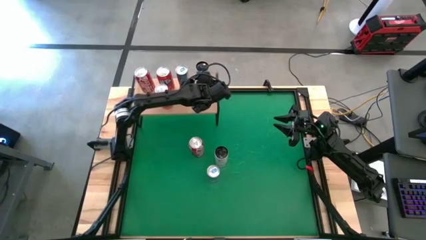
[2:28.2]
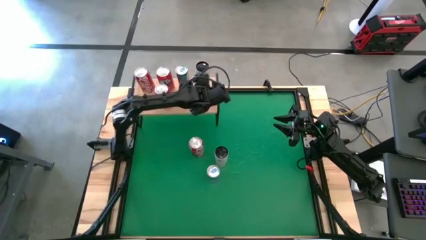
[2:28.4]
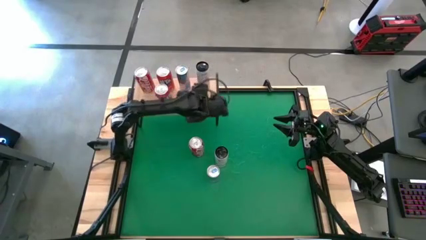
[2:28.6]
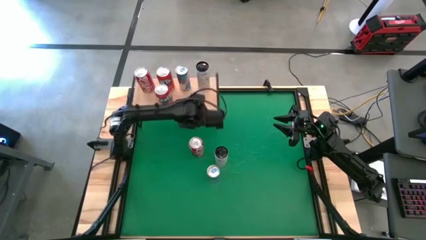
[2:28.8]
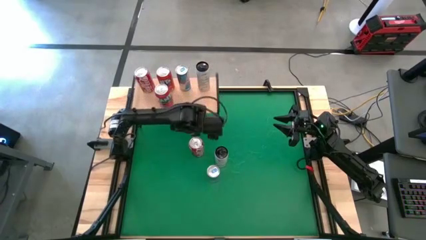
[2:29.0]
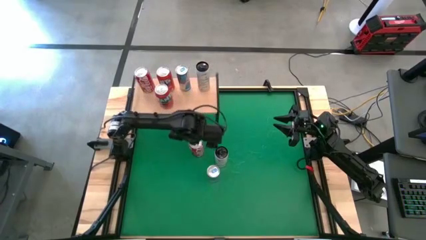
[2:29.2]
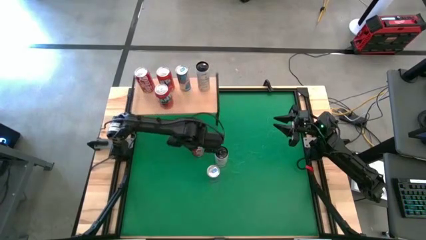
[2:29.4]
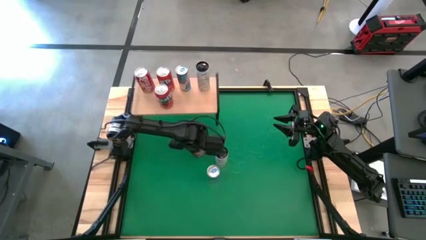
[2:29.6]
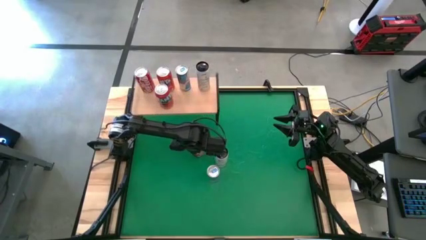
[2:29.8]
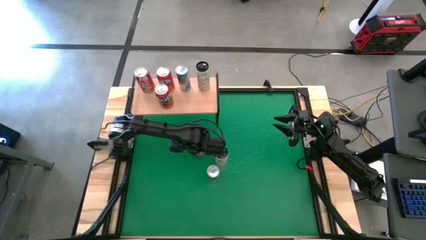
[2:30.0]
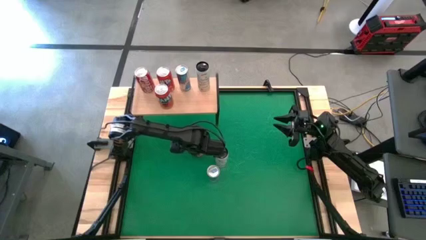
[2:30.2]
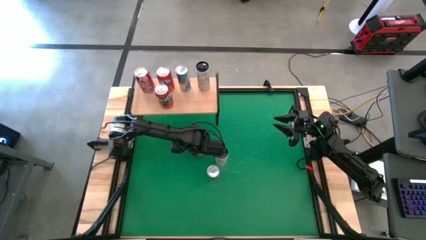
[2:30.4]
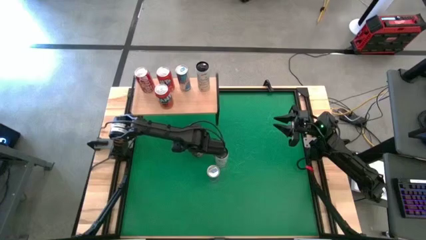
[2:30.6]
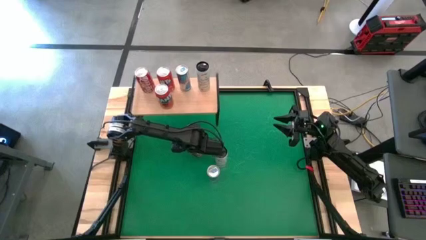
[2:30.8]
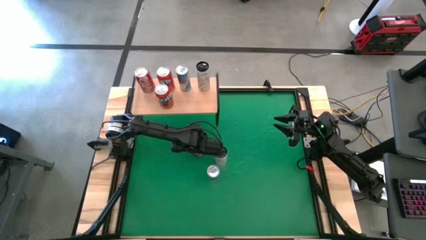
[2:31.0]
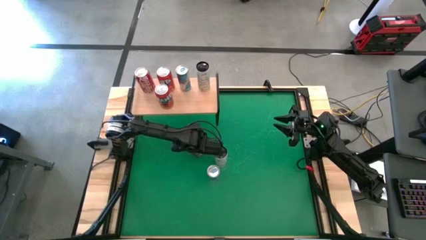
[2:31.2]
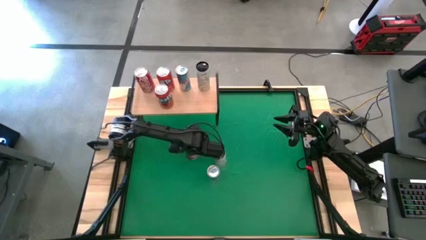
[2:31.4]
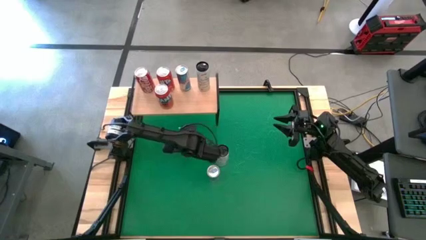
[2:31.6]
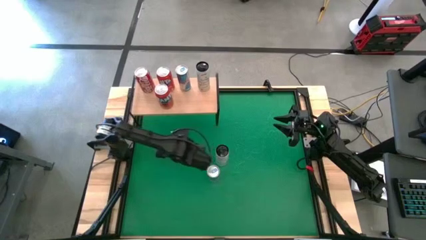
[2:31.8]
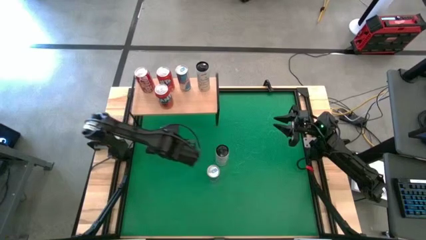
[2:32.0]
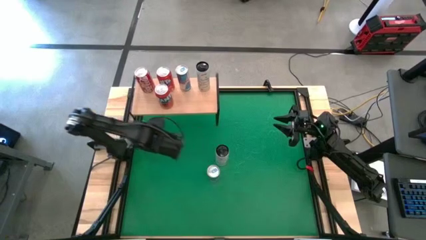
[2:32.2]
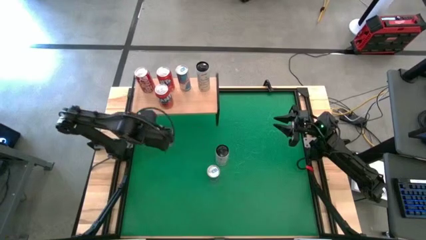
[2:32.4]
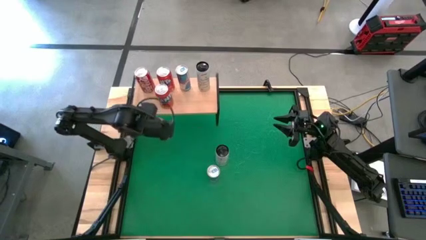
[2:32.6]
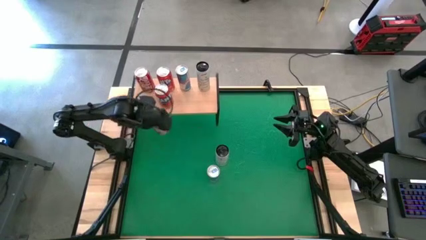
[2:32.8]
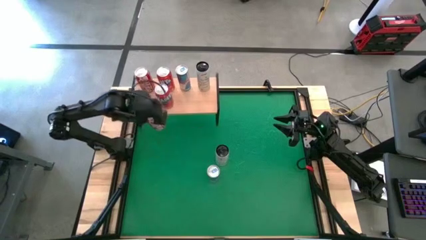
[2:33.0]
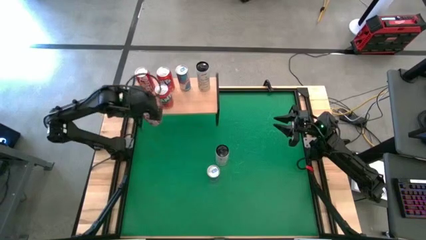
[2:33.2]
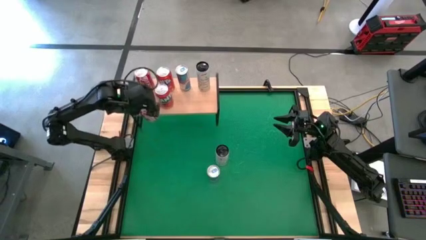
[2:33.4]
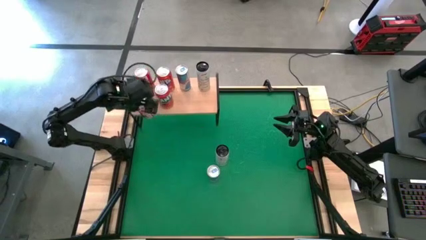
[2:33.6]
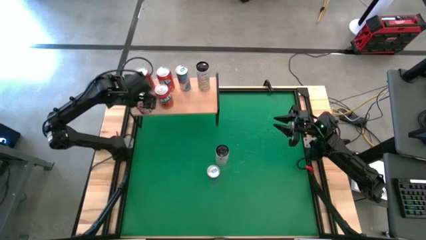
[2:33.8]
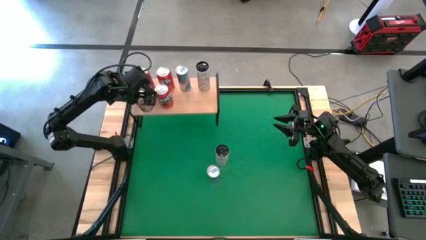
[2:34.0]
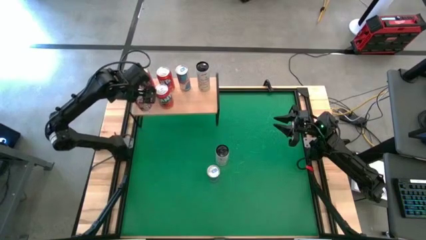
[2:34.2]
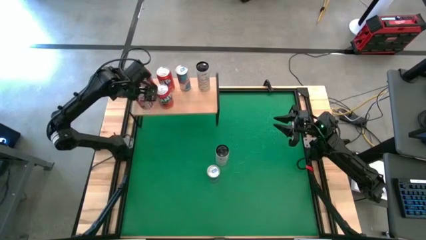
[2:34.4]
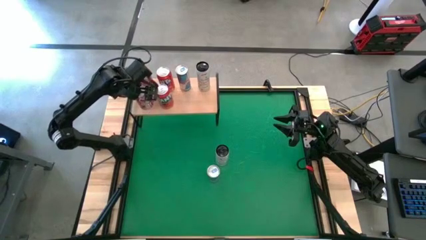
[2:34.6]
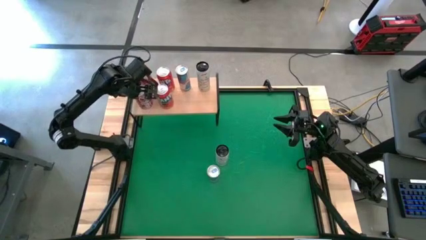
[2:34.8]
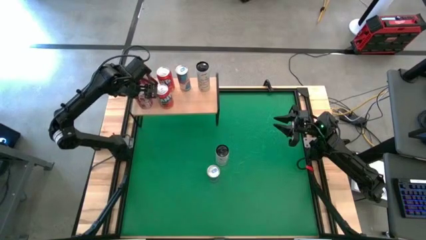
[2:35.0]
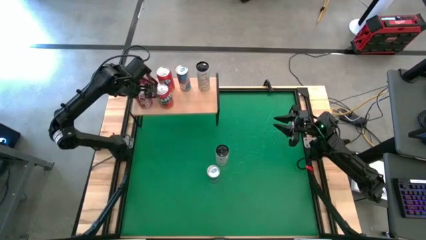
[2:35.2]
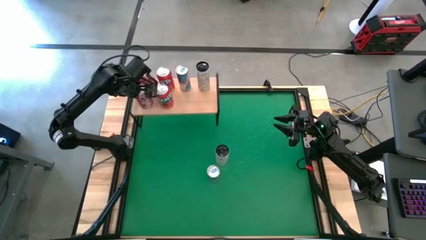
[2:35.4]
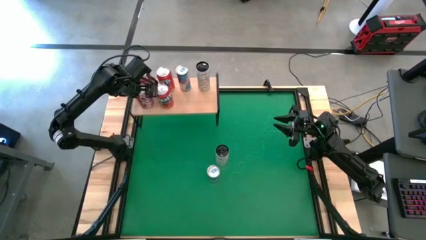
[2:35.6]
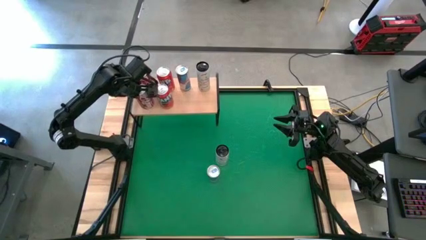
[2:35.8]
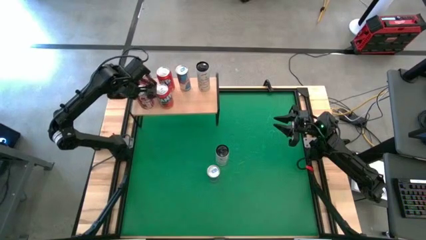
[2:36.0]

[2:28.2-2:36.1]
Task: Place canned beverage on shelf
Put the red white soda can aligned with the other red white soda can on the shelf

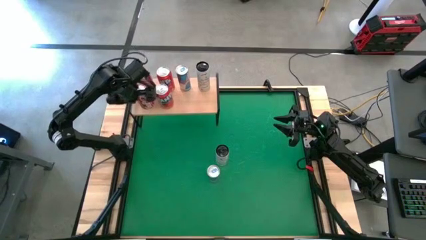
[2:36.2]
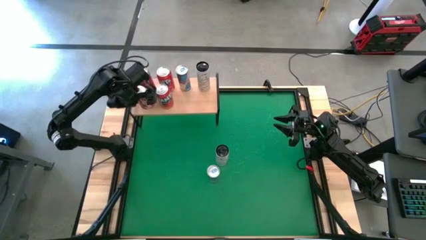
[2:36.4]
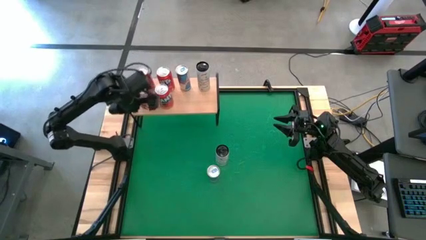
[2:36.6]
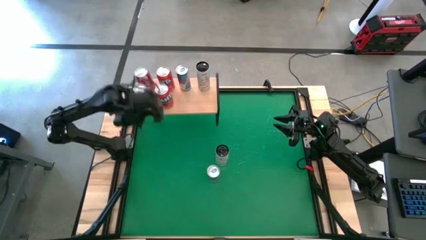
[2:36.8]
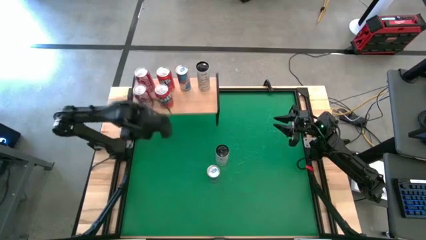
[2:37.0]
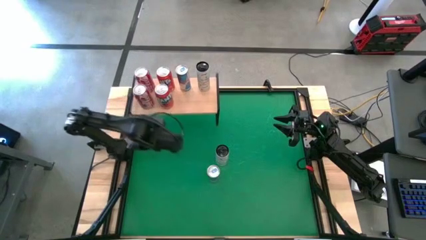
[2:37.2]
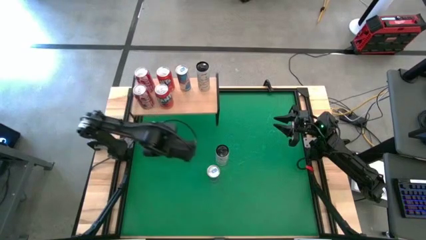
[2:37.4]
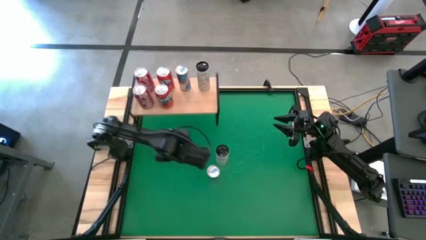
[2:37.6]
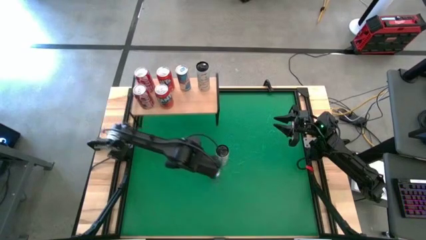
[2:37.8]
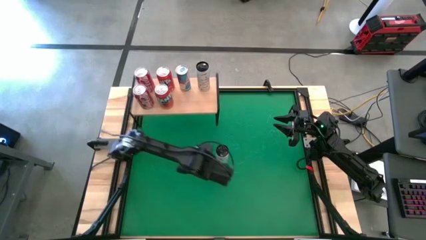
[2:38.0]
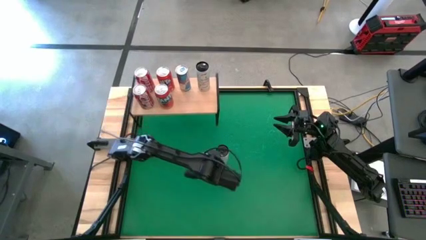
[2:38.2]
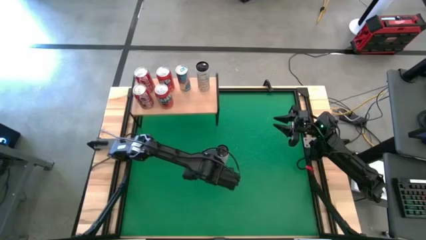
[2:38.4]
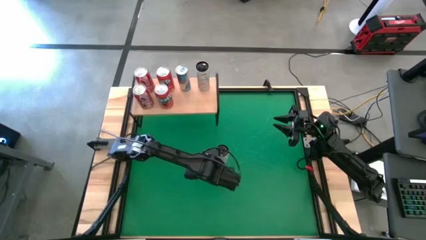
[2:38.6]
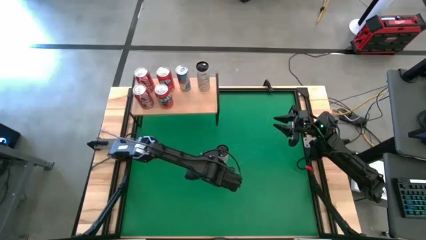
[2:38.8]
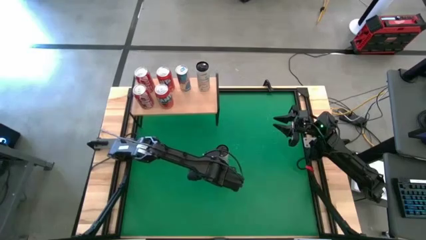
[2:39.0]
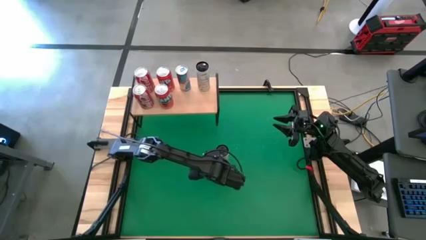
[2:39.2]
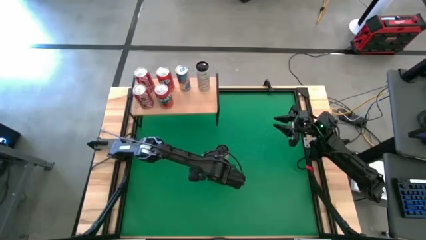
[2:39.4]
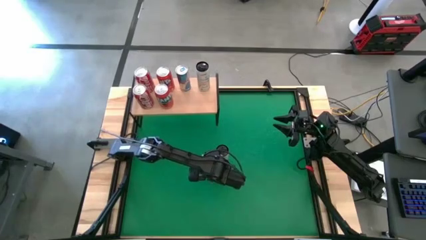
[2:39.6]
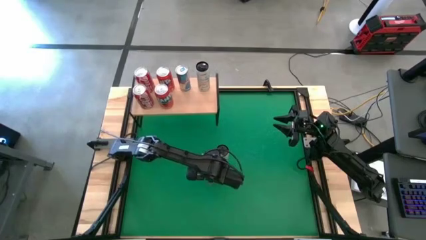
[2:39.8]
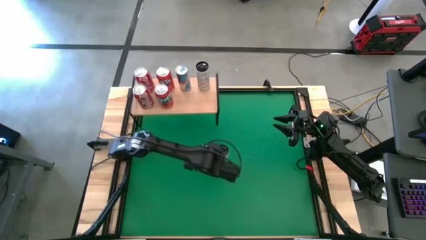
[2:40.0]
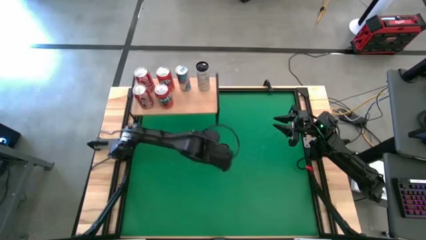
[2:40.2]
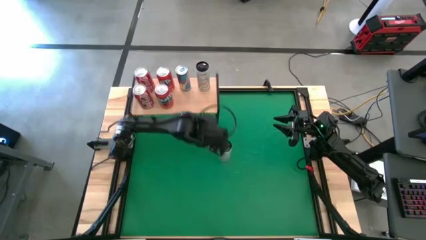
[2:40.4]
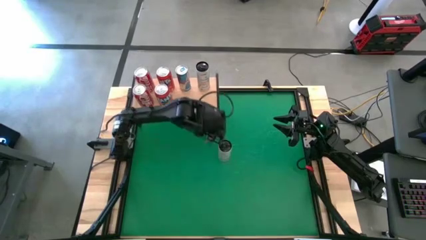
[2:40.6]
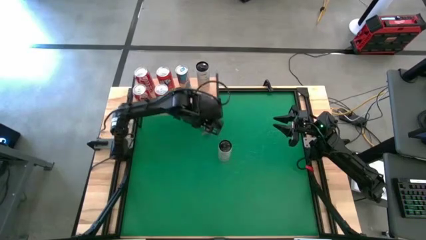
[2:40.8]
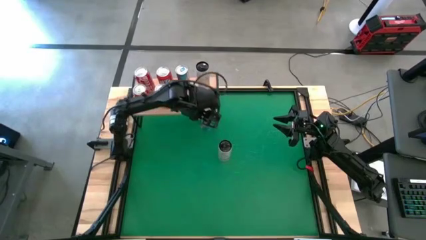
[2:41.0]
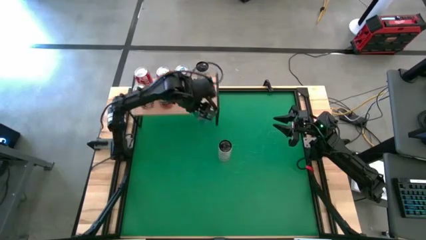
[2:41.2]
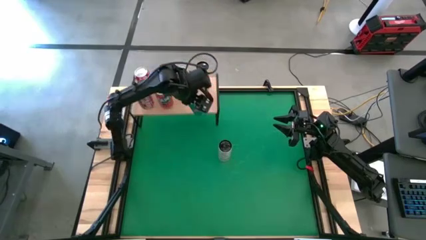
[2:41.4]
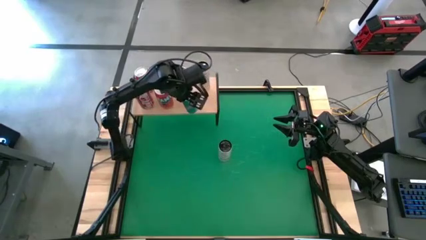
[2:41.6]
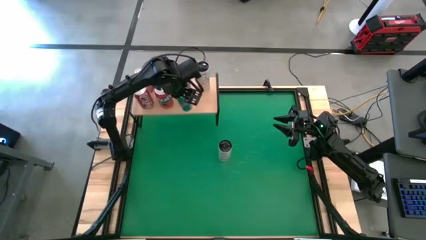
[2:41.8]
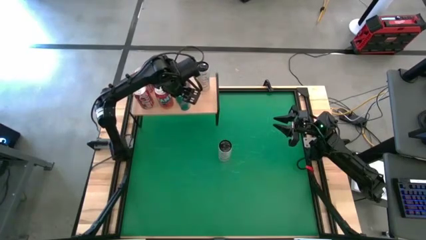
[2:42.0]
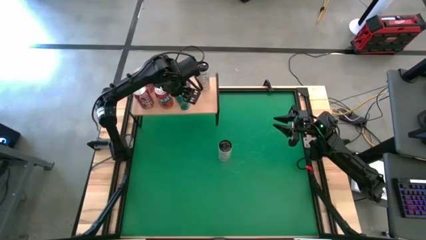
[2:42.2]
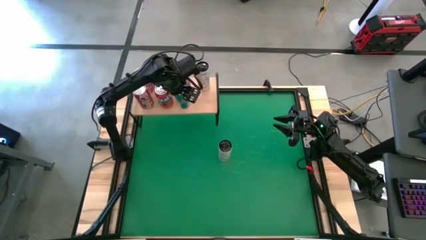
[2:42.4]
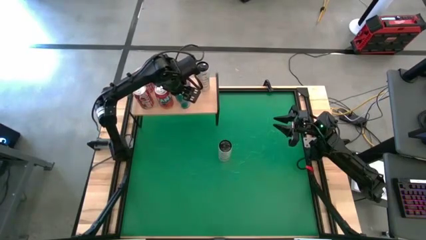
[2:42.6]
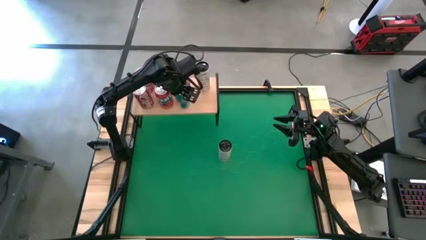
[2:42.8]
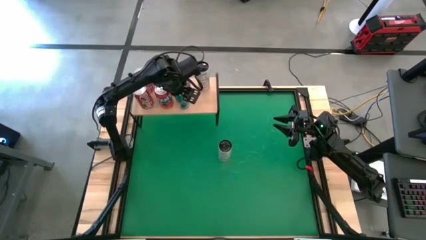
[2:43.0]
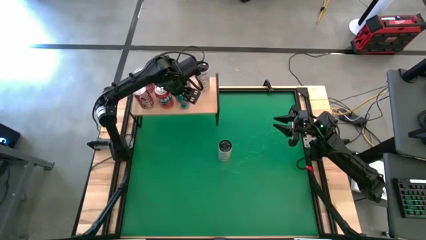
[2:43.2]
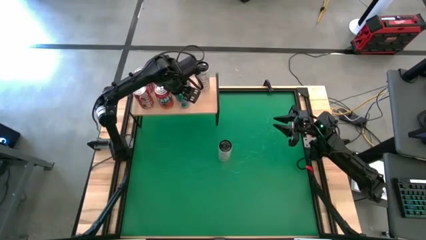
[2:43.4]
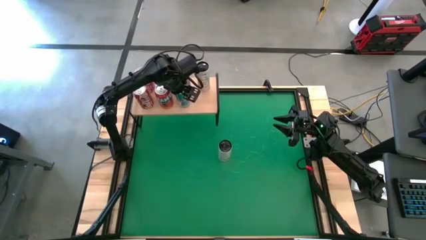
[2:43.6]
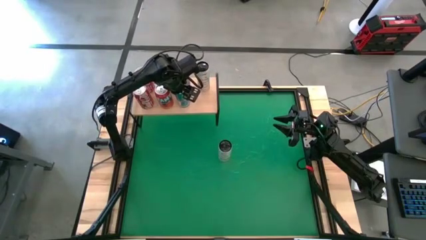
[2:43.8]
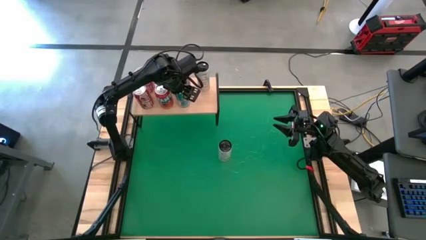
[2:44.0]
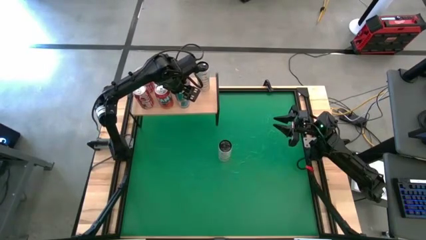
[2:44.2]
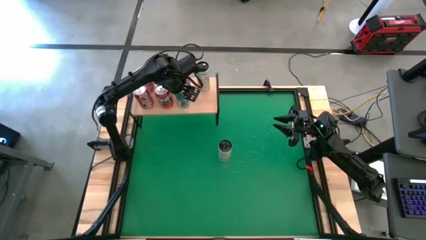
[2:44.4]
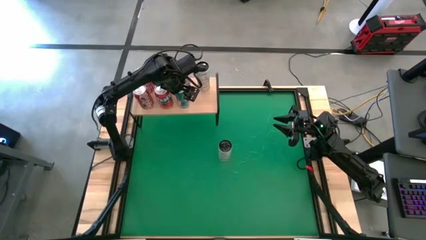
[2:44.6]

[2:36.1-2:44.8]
Put the blue soda can aligned with the other blue soda can on the shelf
